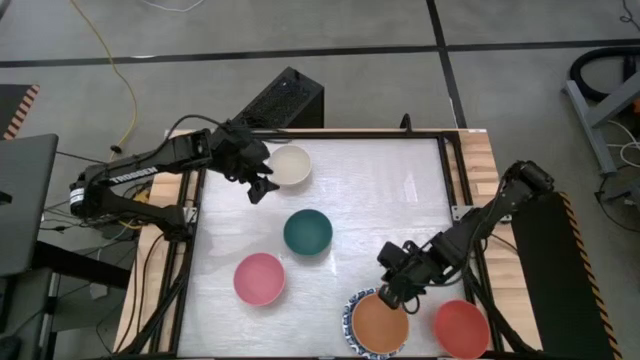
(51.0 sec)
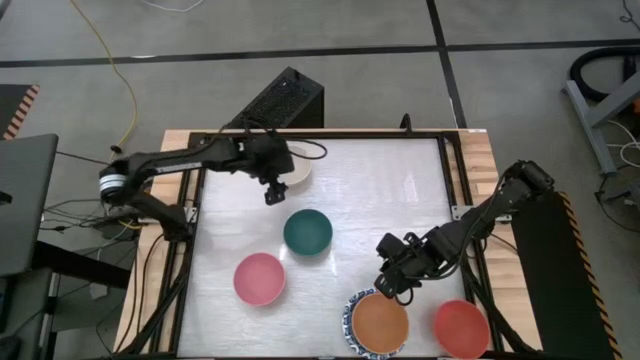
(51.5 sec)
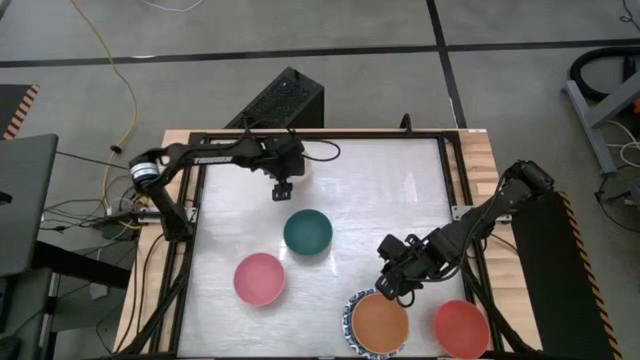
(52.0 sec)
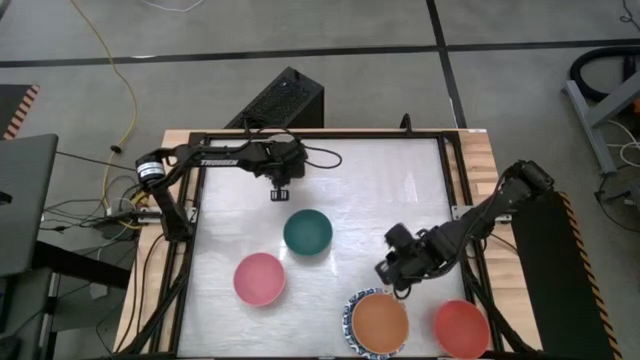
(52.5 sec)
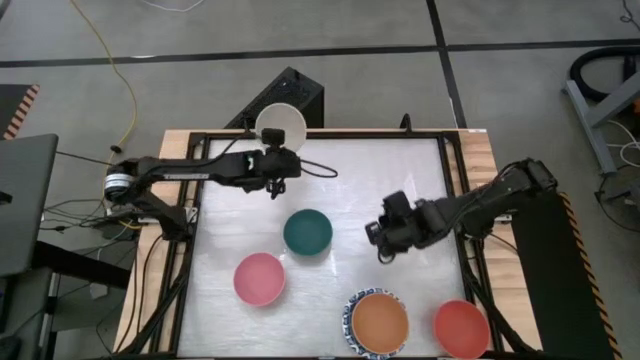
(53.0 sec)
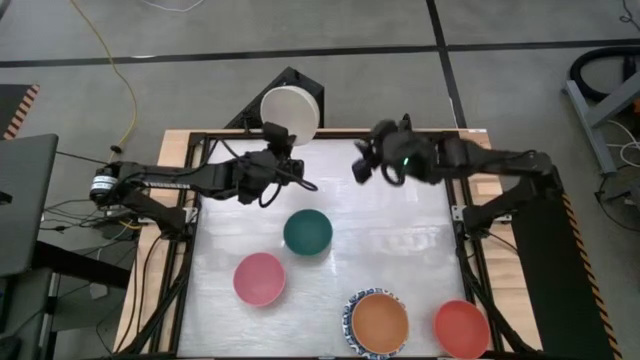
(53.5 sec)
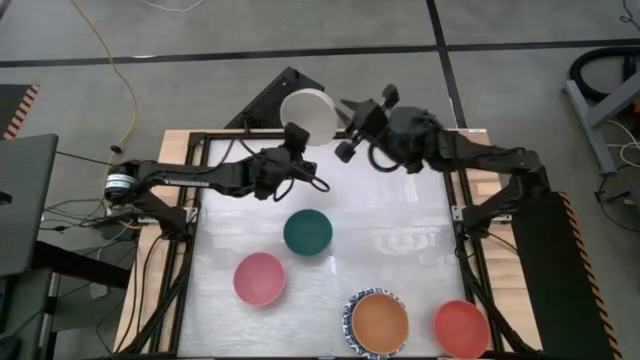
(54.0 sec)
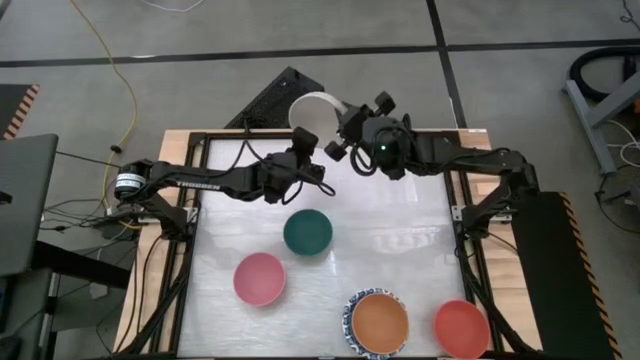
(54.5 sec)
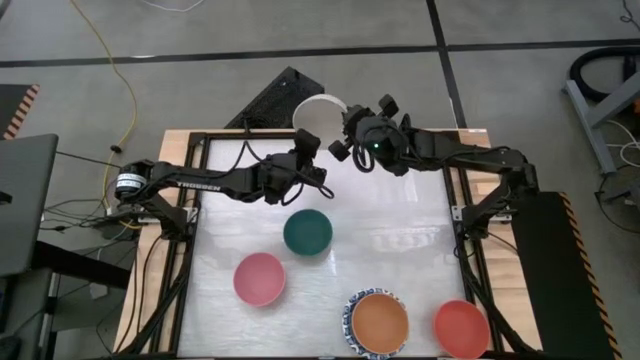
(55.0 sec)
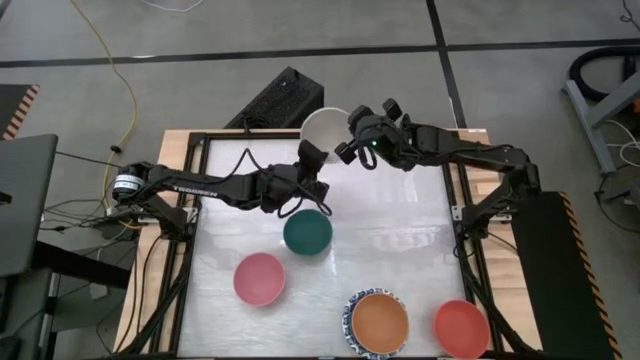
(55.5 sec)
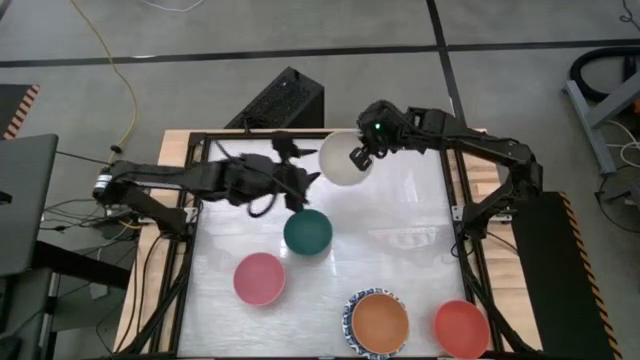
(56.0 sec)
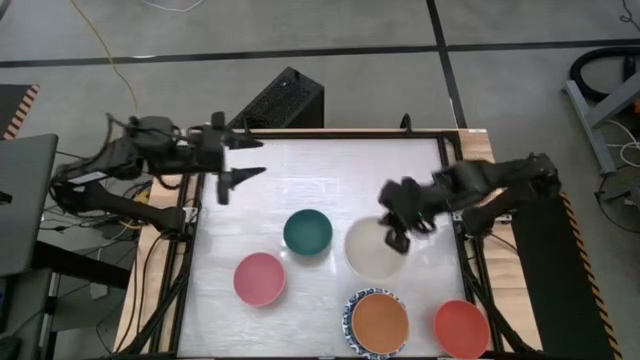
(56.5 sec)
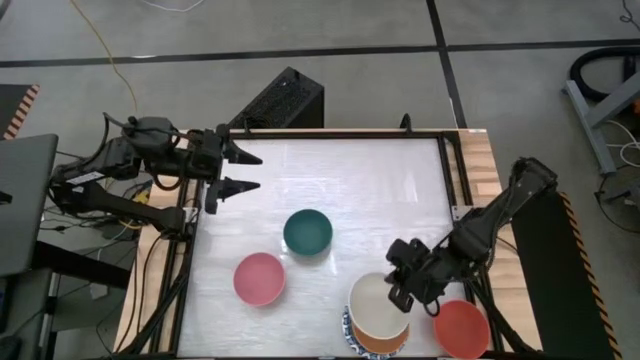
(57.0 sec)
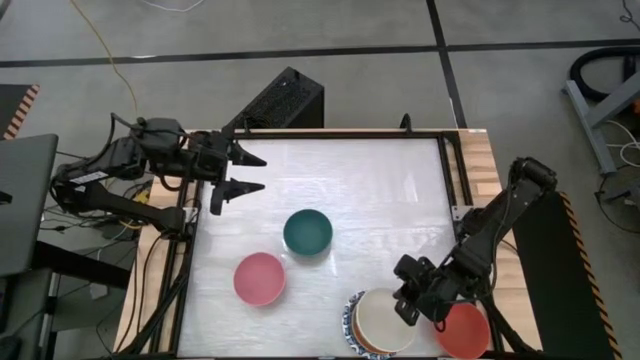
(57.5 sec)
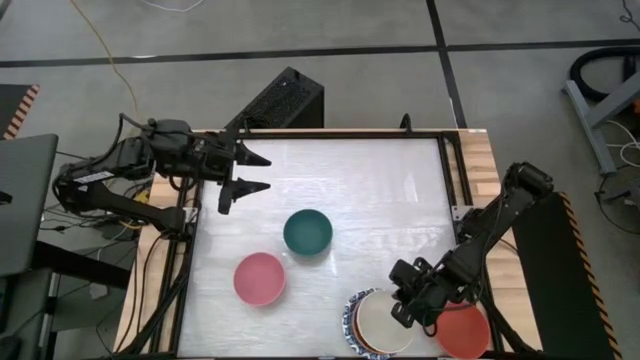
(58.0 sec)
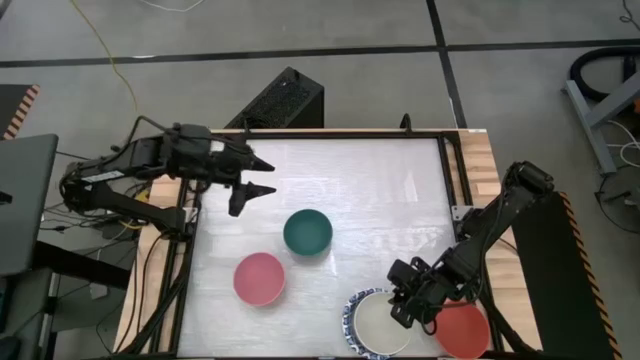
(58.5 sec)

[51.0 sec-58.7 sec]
Stack the white bowl onto the light orange bowl

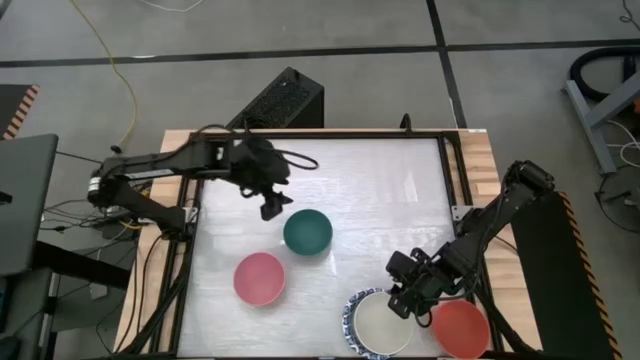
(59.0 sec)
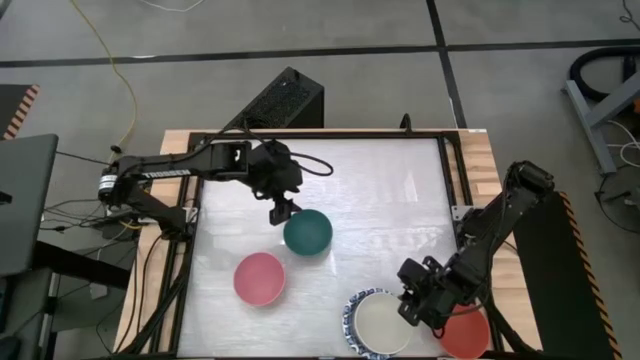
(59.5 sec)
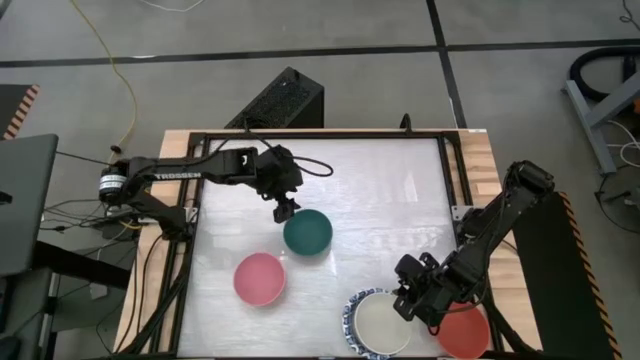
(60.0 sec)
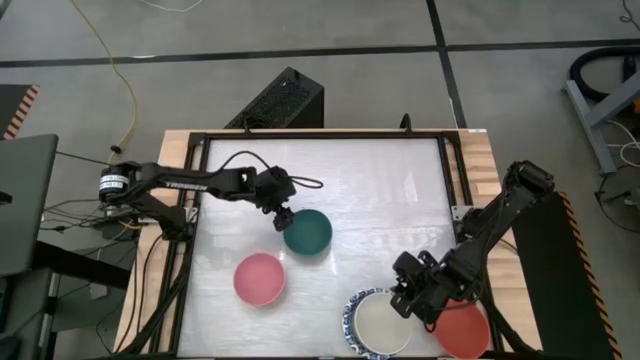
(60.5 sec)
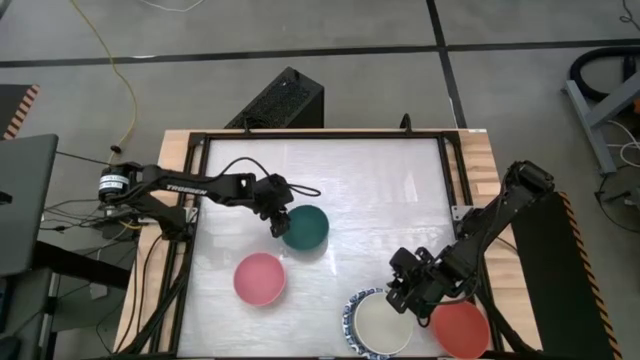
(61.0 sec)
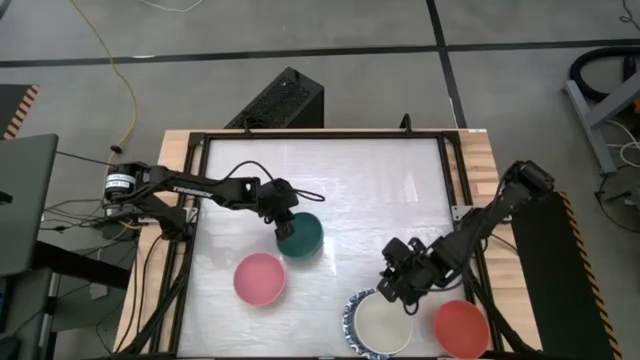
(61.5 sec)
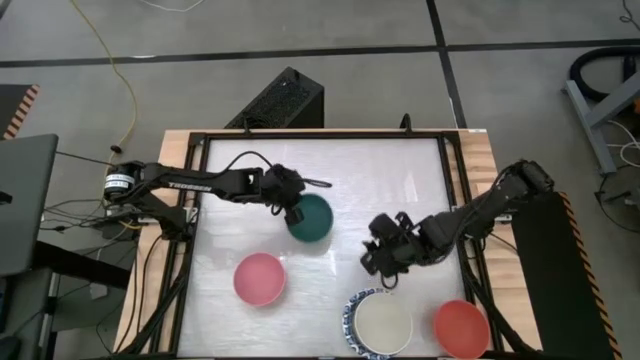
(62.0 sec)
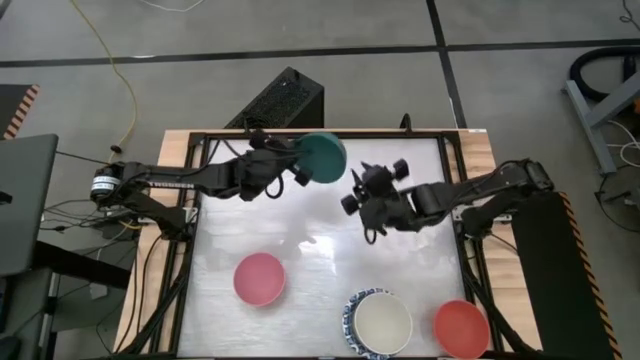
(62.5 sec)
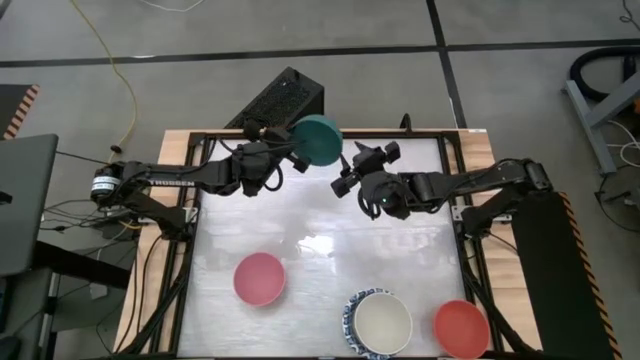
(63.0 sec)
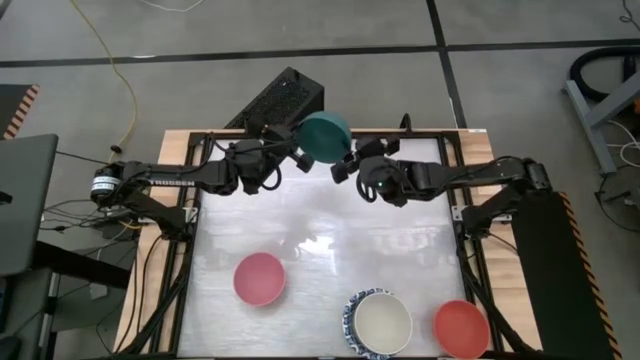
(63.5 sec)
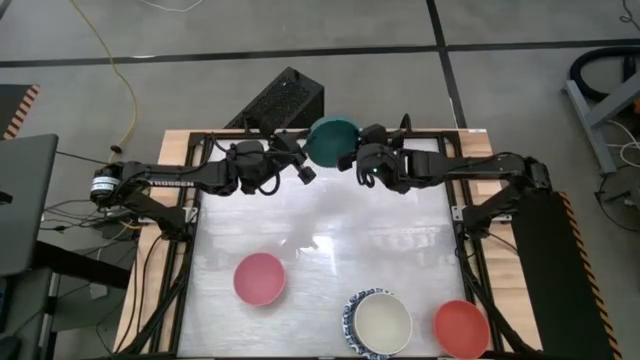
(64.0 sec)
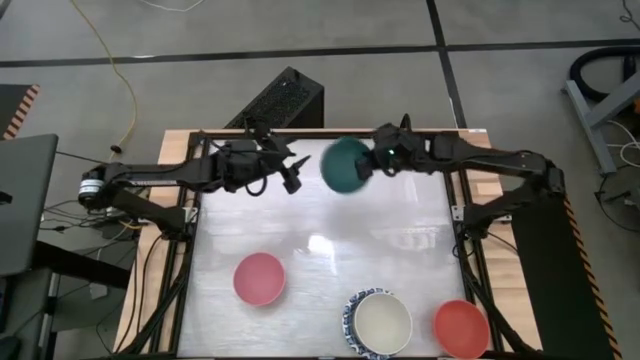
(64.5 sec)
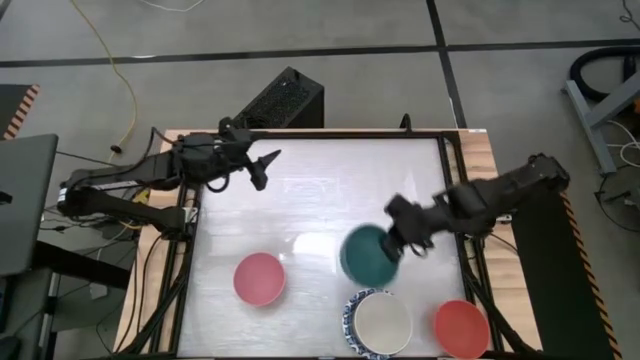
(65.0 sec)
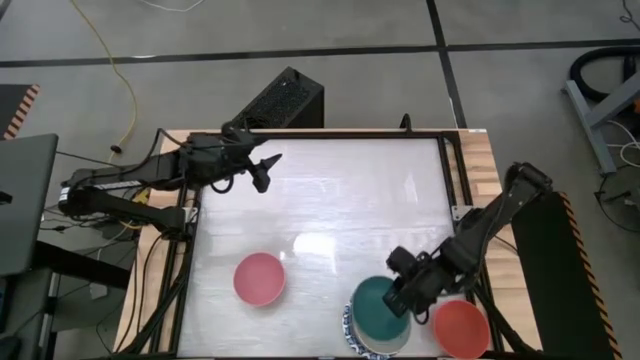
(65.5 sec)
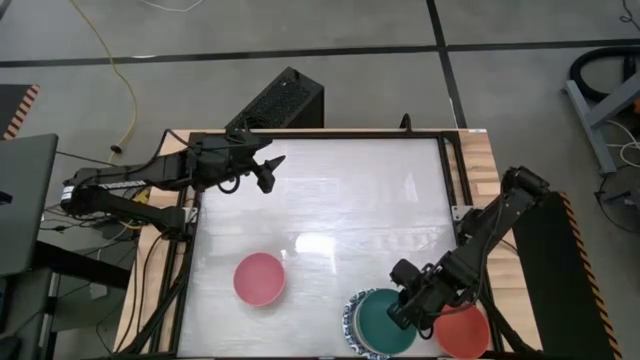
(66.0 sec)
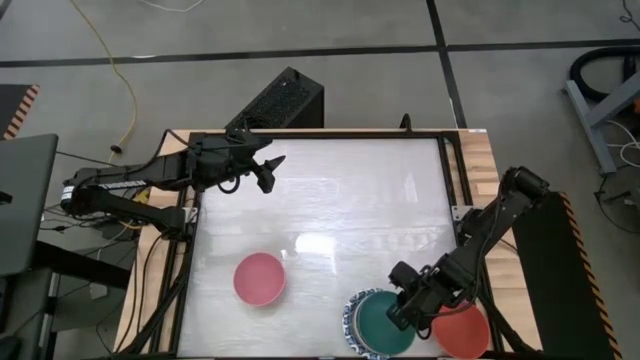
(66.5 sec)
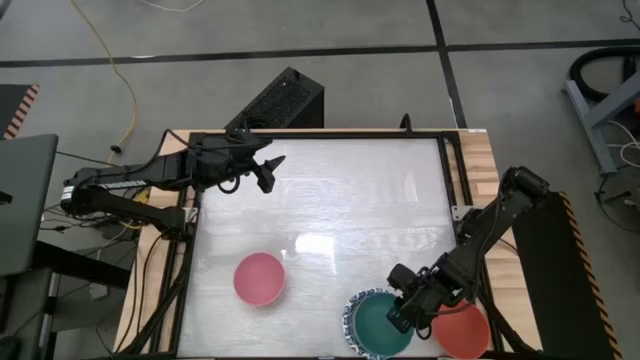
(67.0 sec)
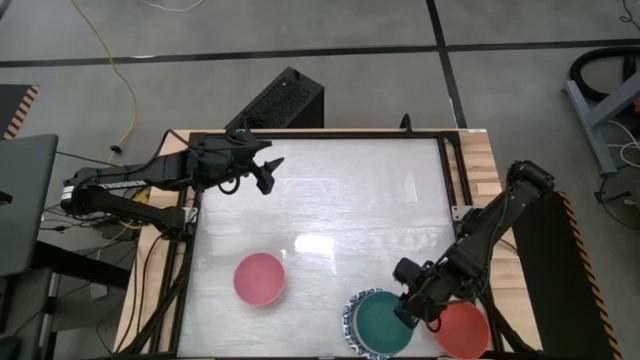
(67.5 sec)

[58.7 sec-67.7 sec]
Stack the dark green bowl into the white bowl

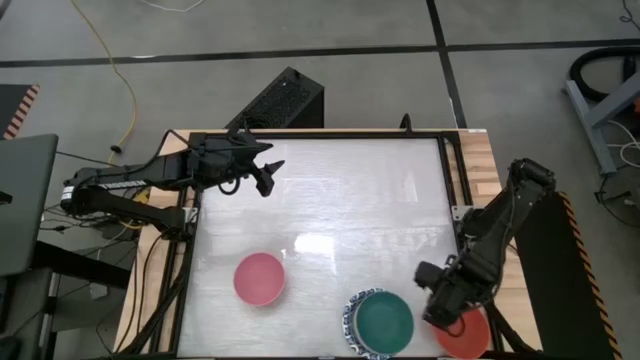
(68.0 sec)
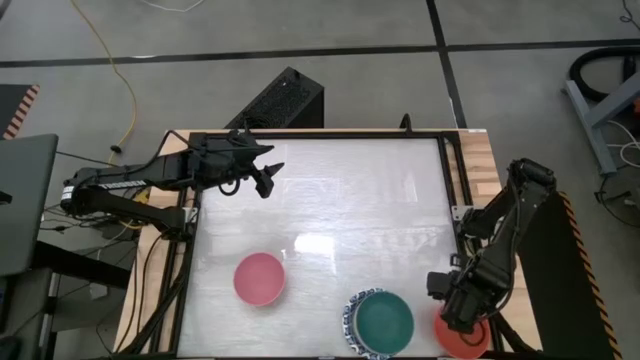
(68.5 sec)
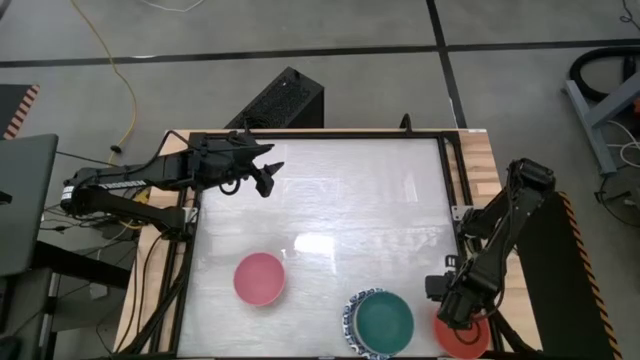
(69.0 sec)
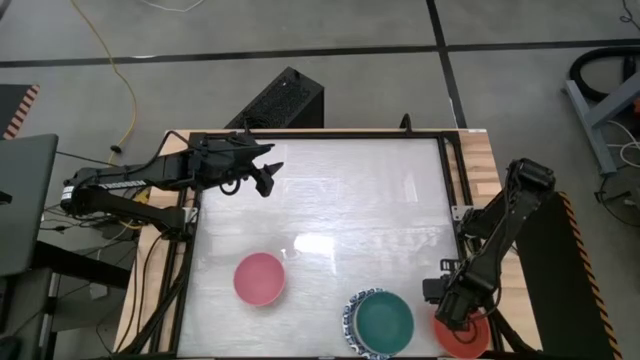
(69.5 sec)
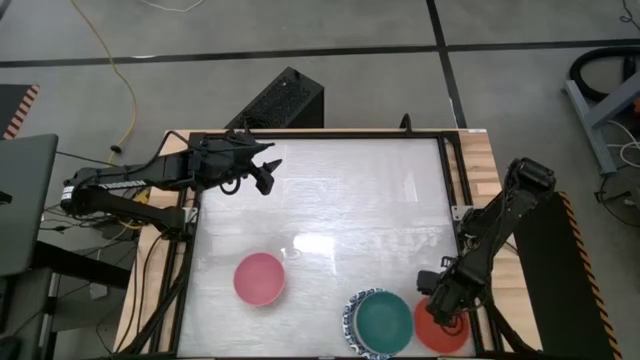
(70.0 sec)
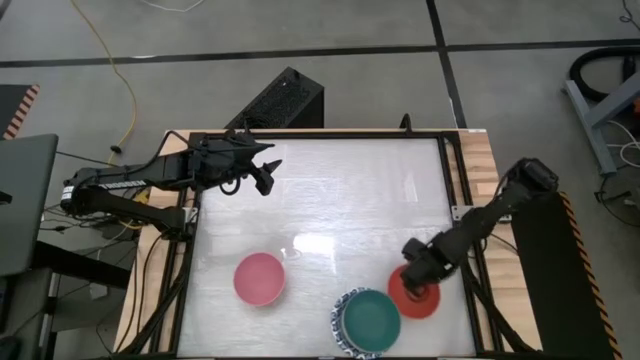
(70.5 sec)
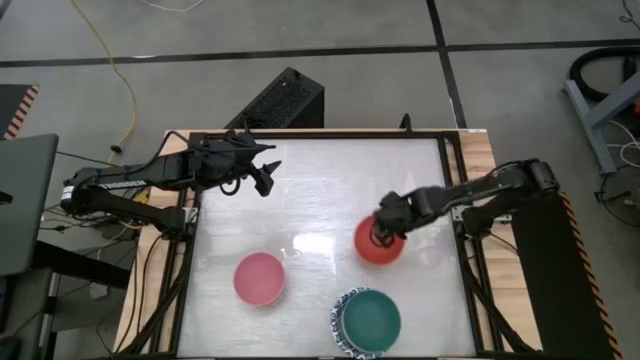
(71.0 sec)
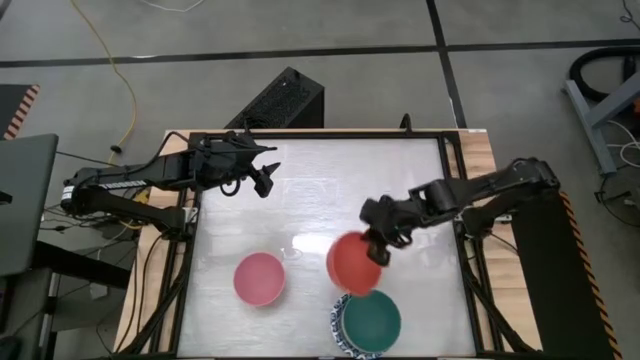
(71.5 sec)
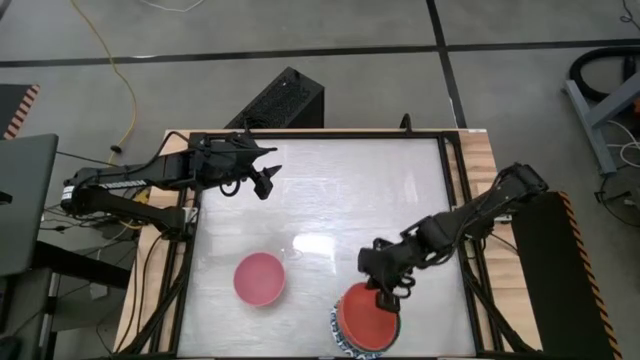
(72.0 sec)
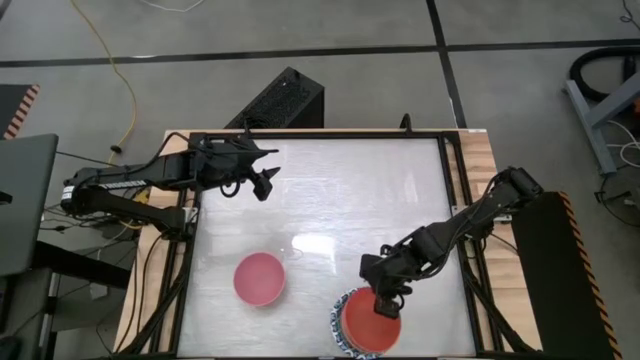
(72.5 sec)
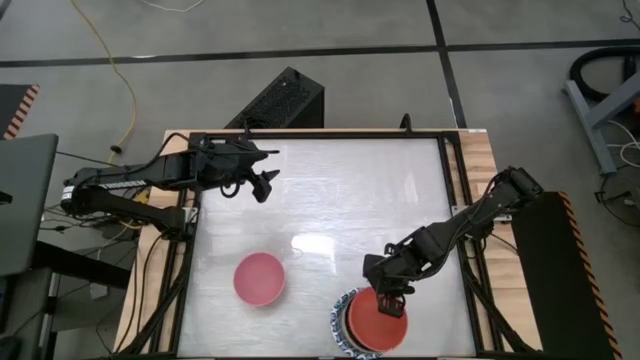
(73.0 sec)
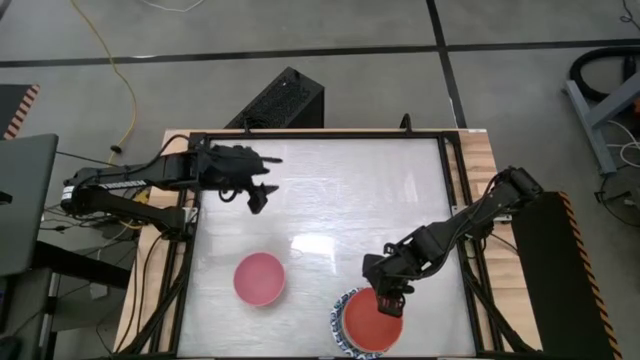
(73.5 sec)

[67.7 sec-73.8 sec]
Stack the orange bowl onto the dark green bowl
